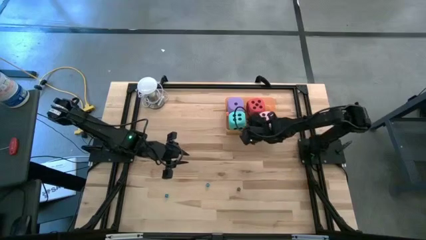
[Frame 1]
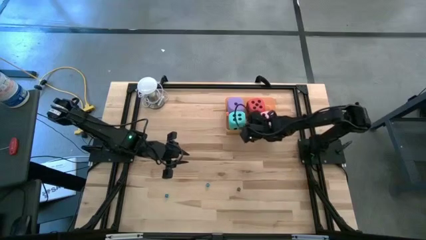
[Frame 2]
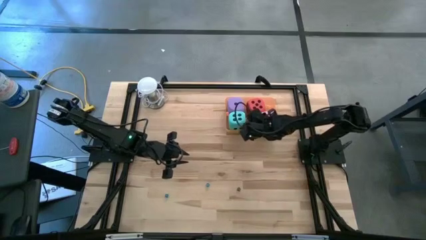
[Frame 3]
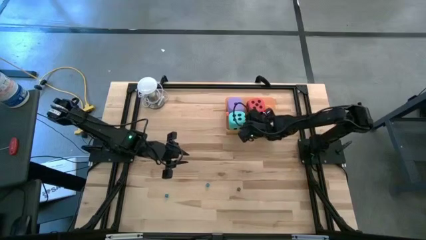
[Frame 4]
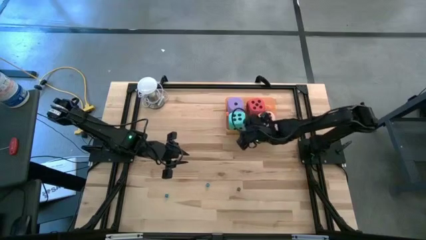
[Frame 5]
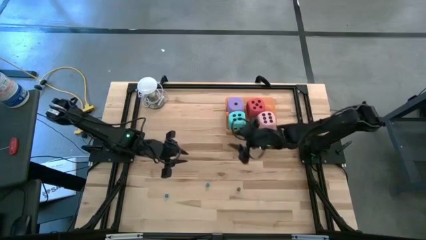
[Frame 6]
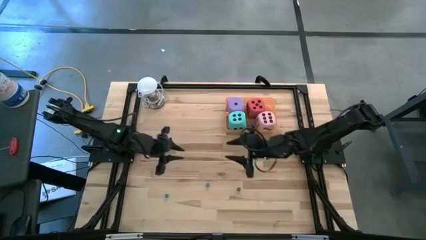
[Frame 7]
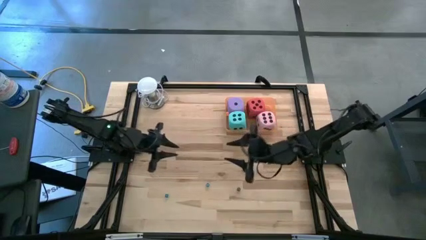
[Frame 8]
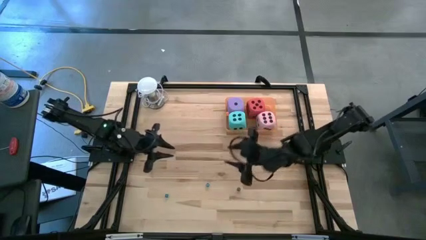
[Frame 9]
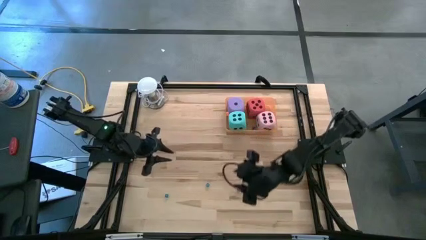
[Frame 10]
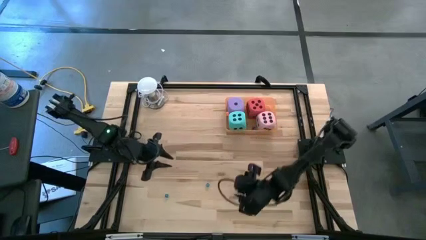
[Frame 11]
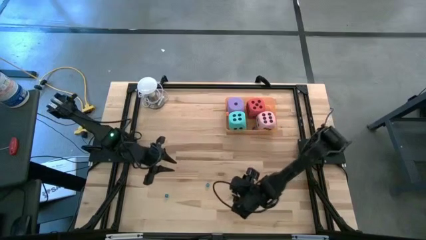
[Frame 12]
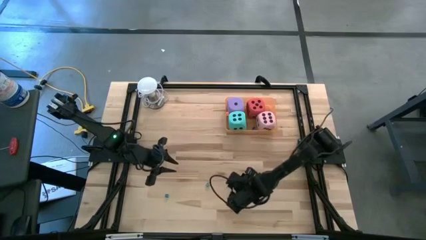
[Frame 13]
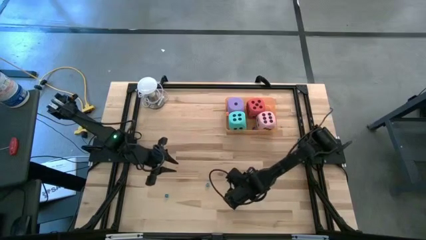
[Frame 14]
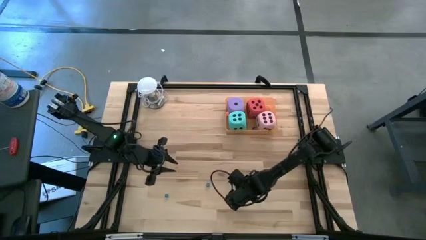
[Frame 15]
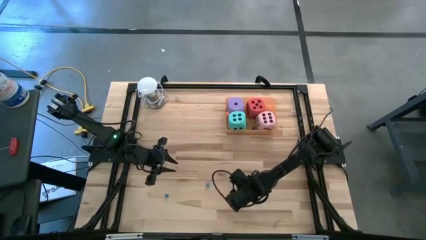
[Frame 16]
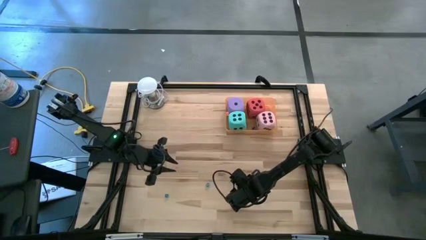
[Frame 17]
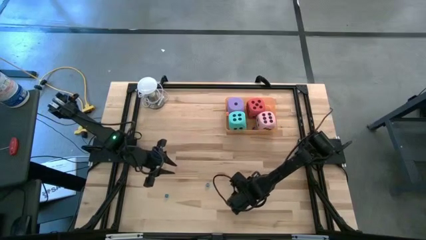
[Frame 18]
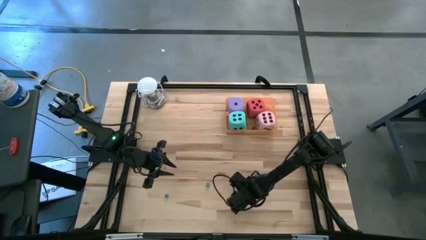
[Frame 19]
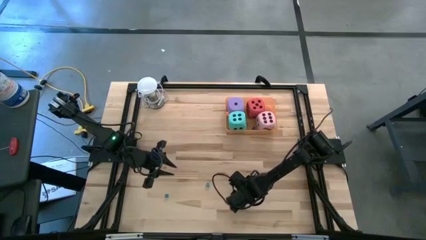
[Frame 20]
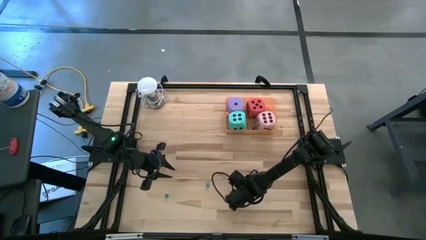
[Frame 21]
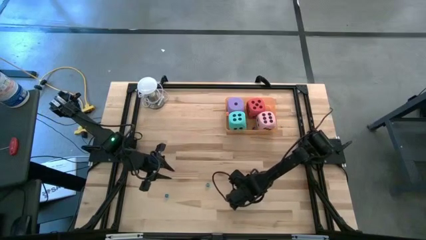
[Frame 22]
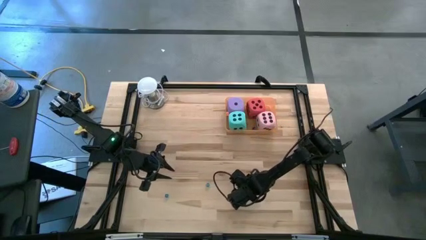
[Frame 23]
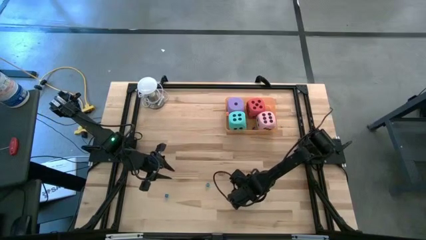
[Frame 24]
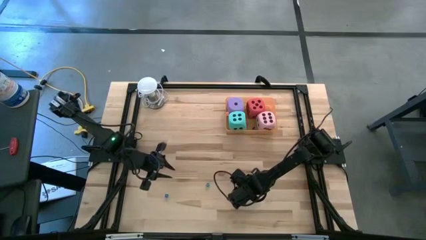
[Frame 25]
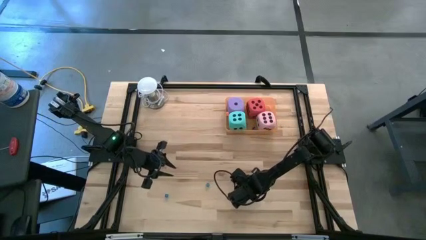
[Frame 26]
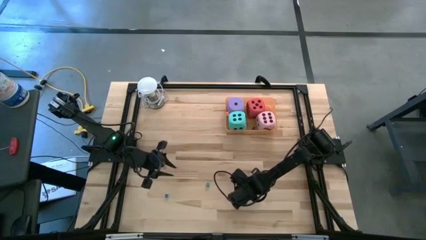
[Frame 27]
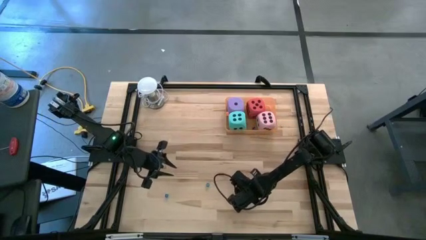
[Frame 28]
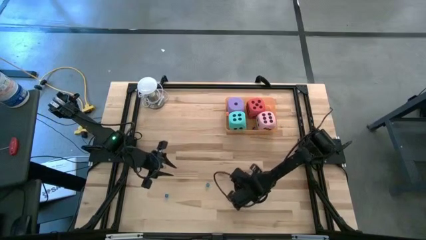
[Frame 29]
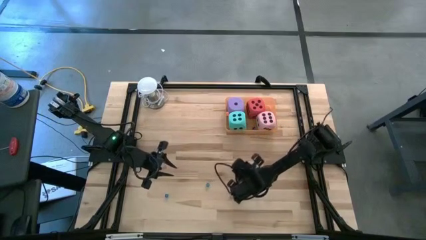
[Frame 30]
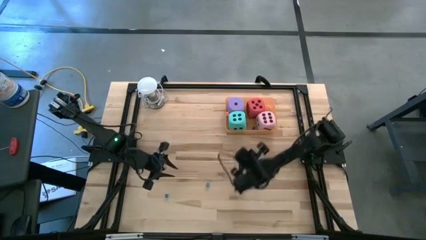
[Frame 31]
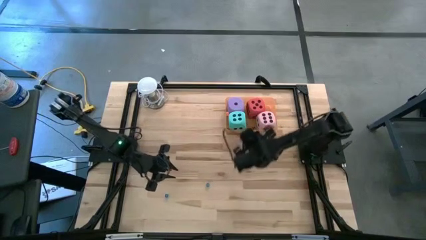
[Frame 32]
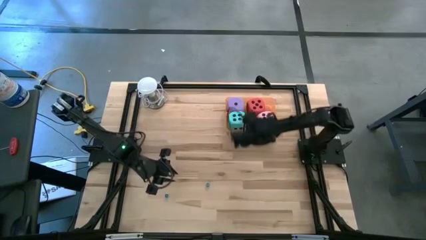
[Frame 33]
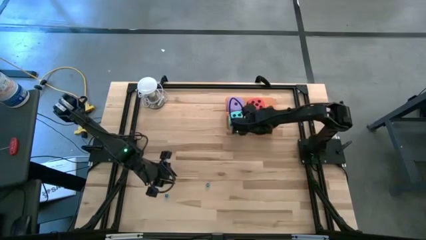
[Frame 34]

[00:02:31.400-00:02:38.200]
Task: Pick & Place Dice
Put the small black die into the the orange bin

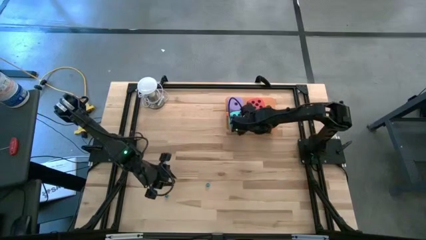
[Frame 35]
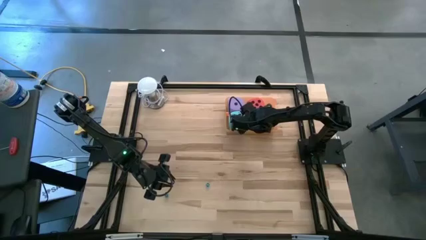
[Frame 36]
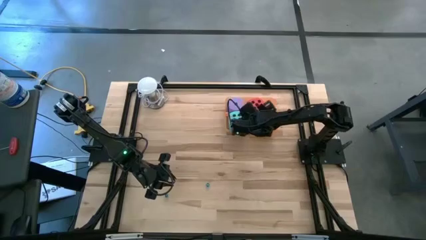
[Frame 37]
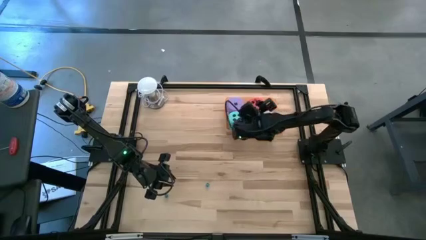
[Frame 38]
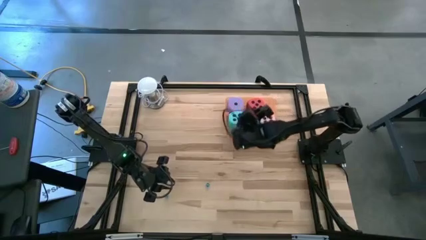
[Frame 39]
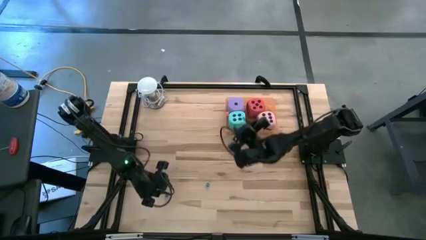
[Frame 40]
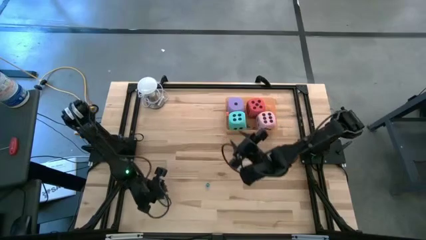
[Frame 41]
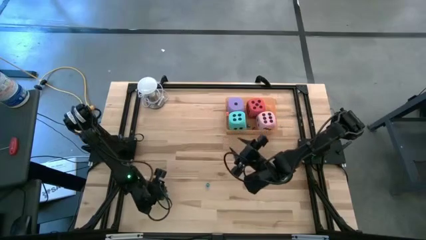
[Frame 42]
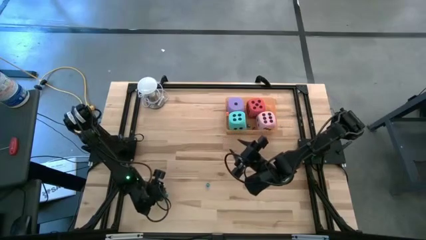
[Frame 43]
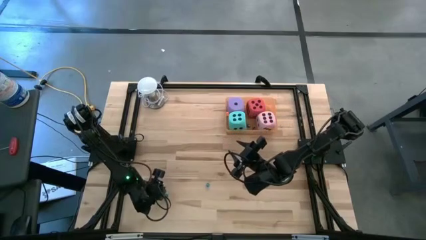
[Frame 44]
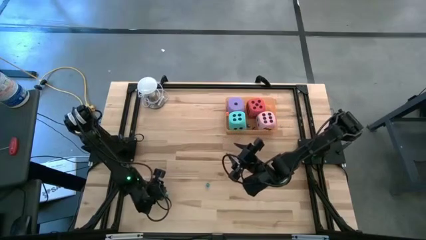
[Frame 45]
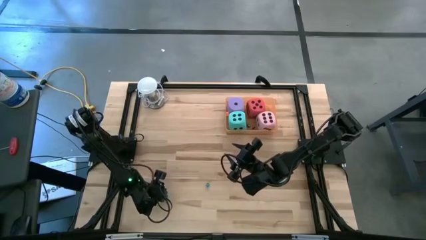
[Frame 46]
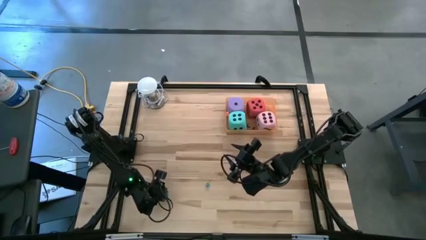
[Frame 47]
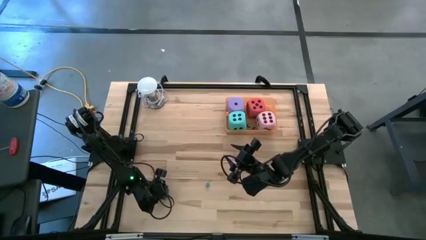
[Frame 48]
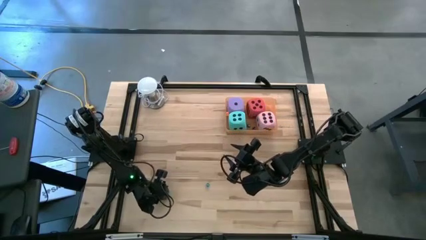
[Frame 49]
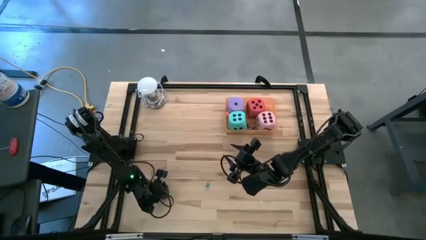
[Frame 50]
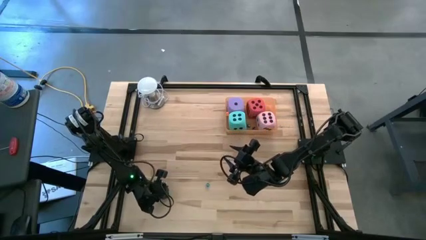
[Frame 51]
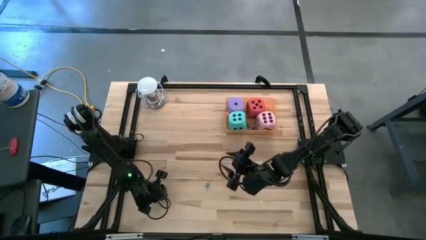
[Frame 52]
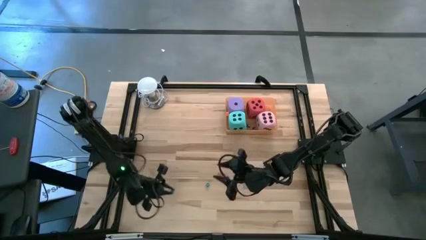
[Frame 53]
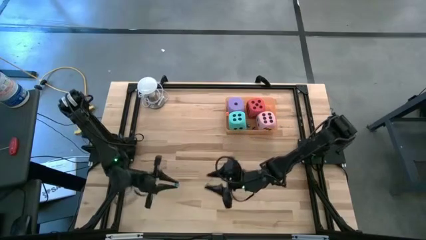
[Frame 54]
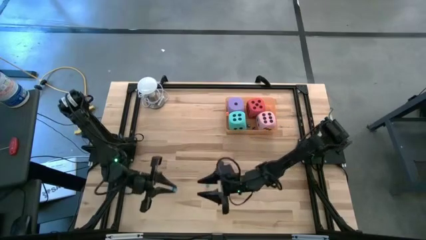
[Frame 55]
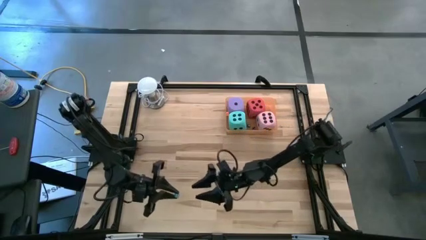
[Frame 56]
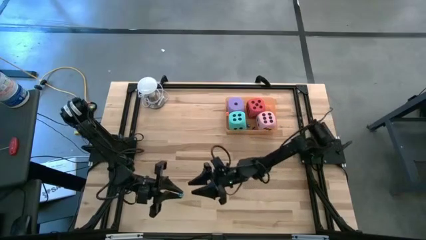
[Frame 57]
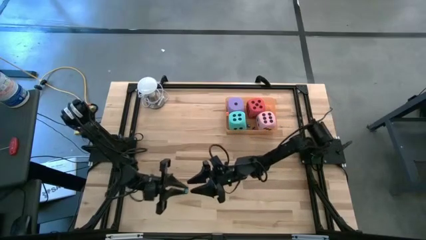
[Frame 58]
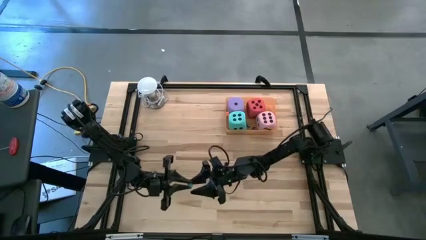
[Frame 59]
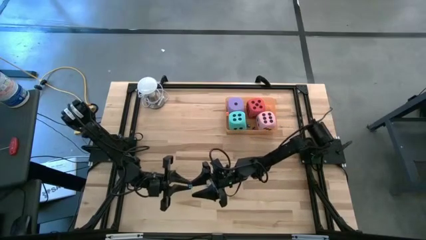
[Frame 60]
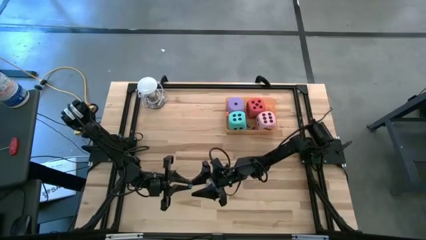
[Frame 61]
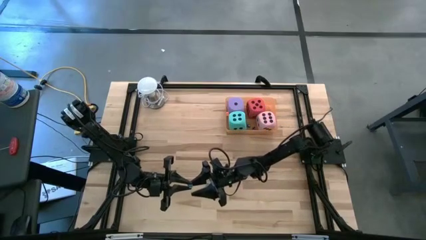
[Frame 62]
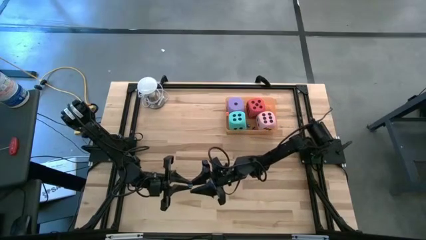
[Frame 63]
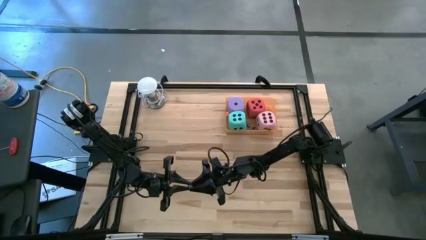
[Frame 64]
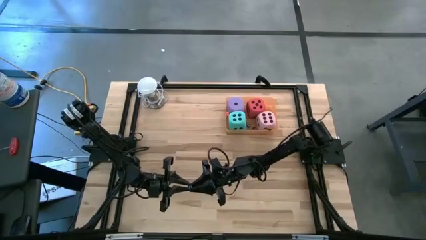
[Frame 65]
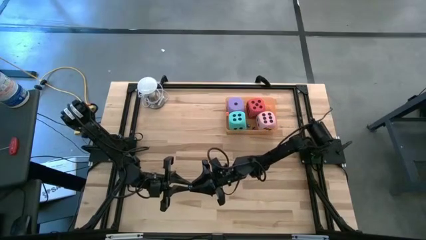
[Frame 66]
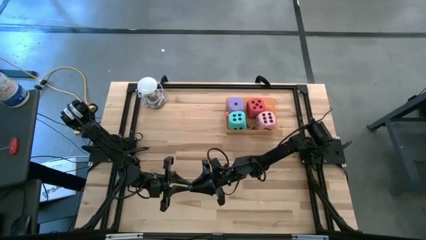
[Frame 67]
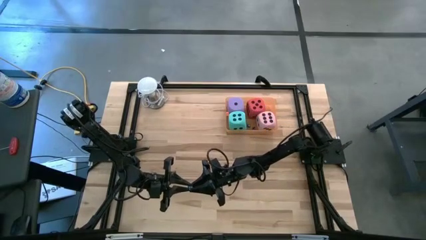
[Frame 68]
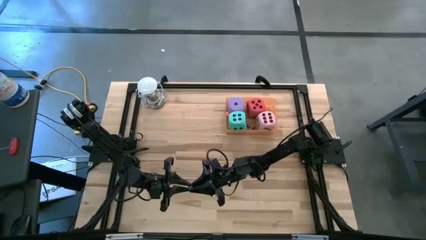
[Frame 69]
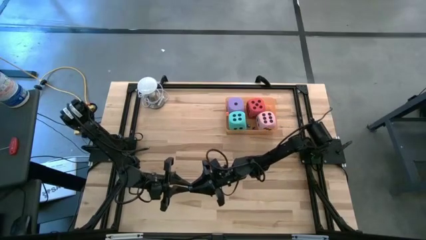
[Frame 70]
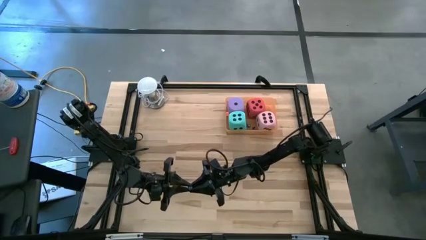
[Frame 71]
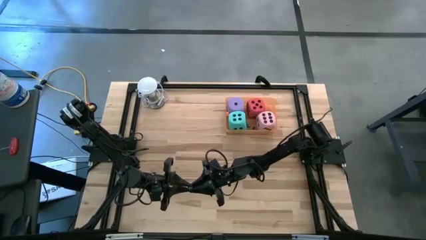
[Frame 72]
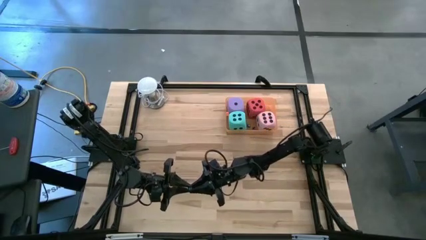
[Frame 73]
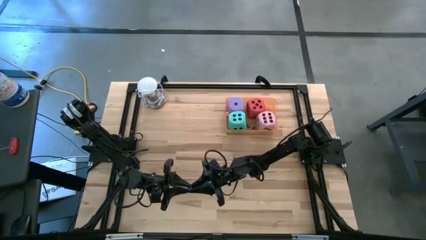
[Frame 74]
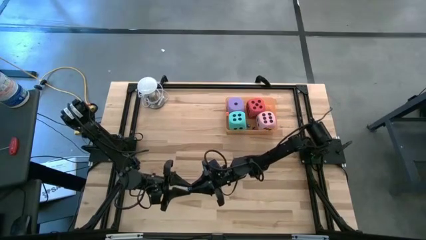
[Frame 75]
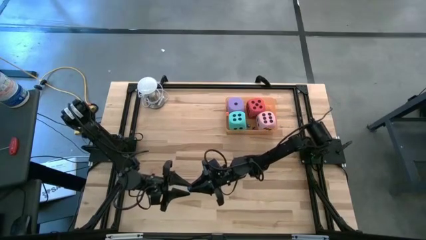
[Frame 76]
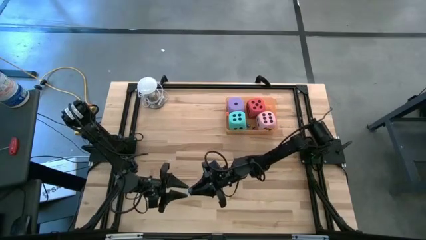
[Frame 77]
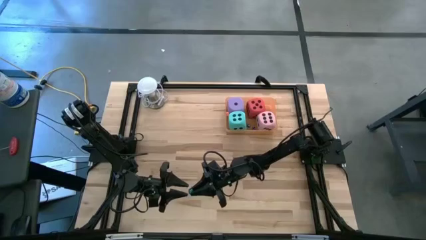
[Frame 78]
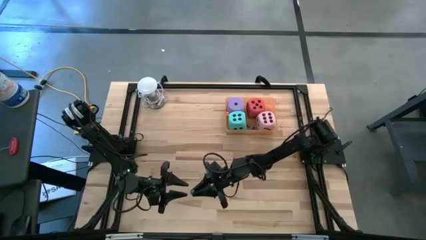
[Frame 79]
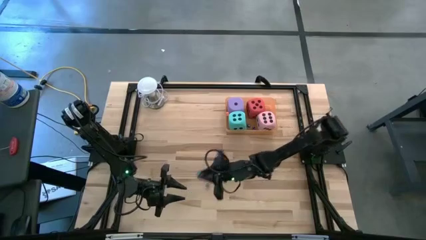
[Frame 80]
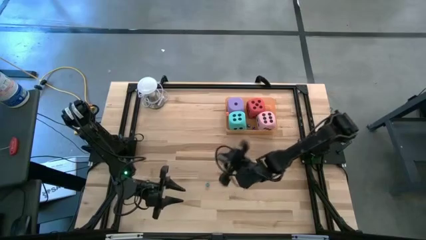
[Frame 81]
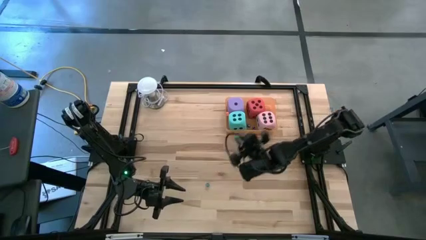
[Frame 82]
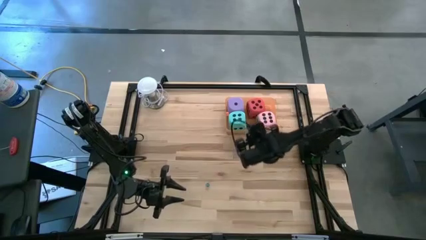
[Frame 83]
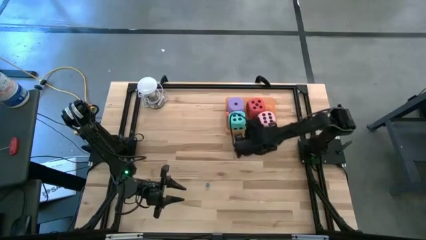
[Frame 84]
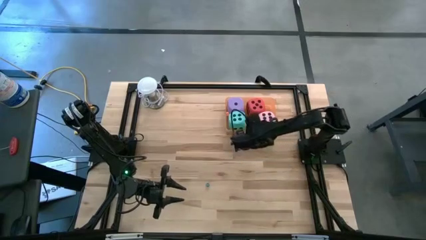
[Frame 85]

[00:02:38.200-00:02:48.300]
Put the small light blue die into the the orange bin
